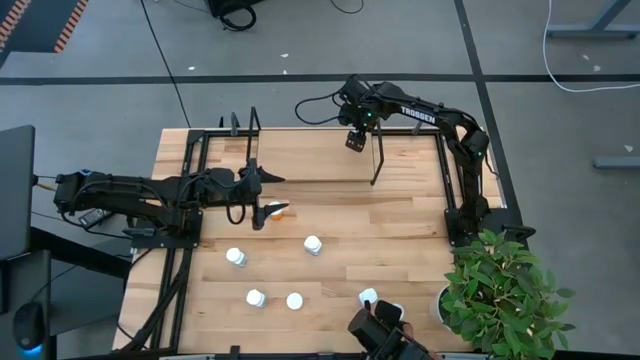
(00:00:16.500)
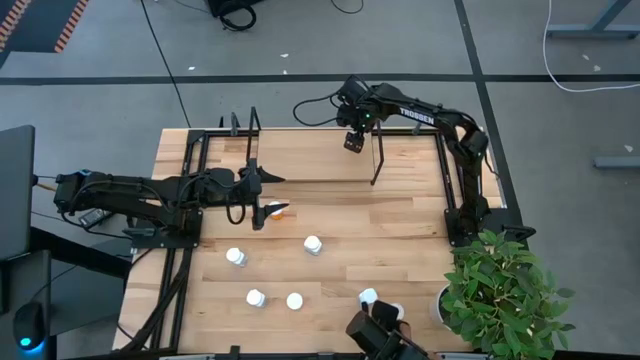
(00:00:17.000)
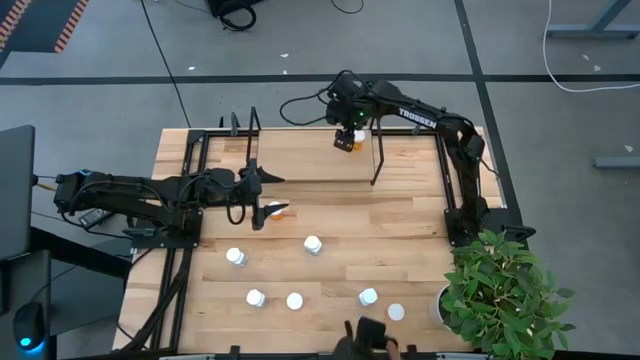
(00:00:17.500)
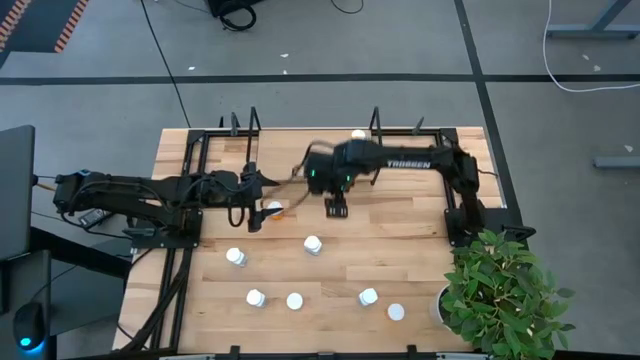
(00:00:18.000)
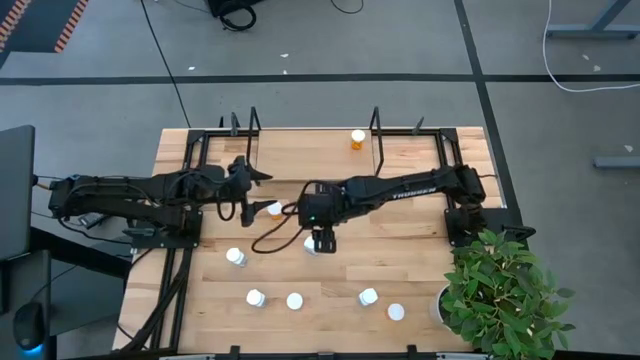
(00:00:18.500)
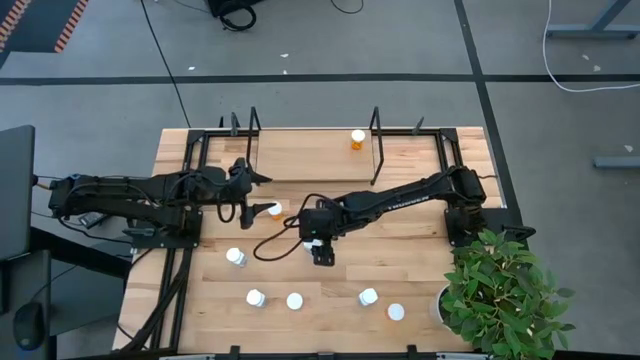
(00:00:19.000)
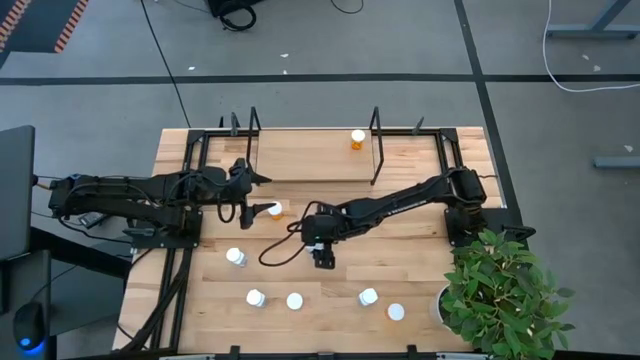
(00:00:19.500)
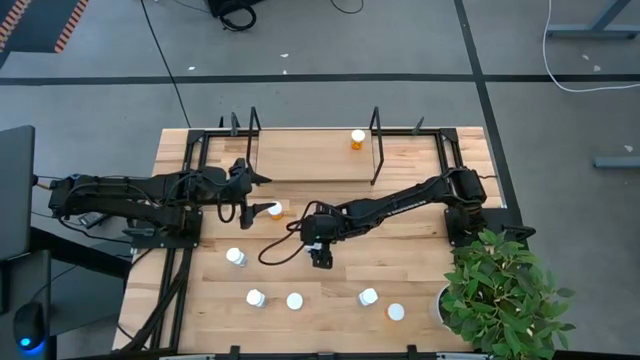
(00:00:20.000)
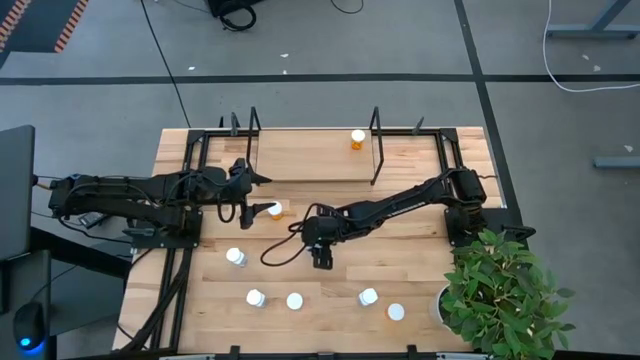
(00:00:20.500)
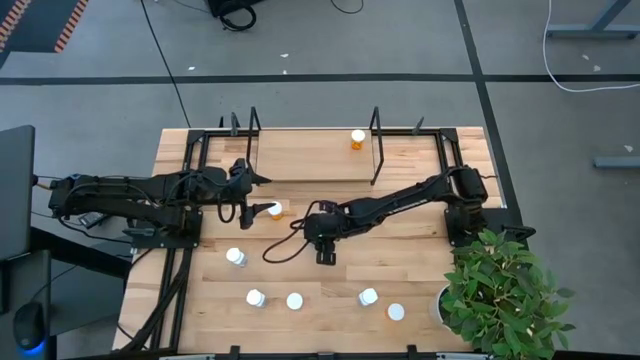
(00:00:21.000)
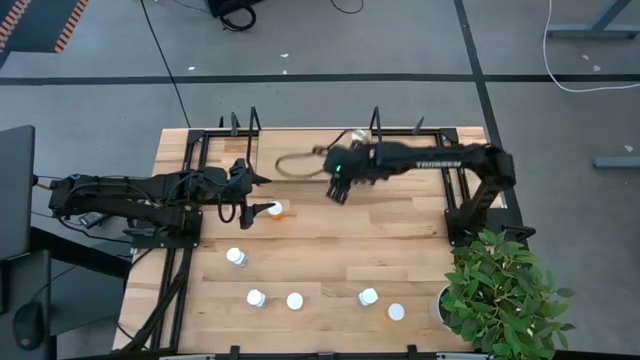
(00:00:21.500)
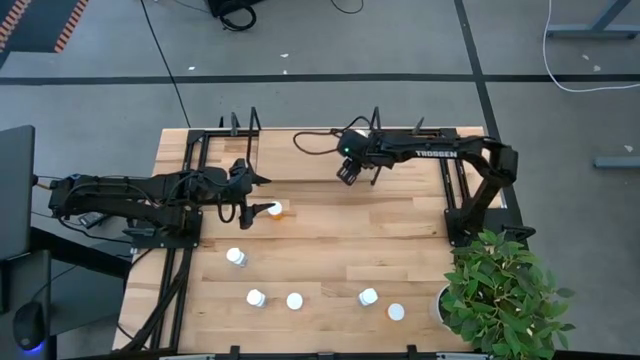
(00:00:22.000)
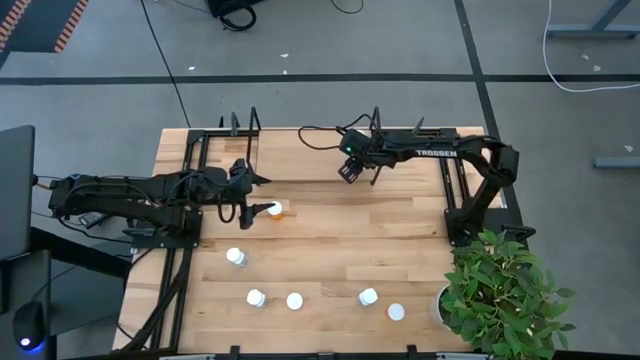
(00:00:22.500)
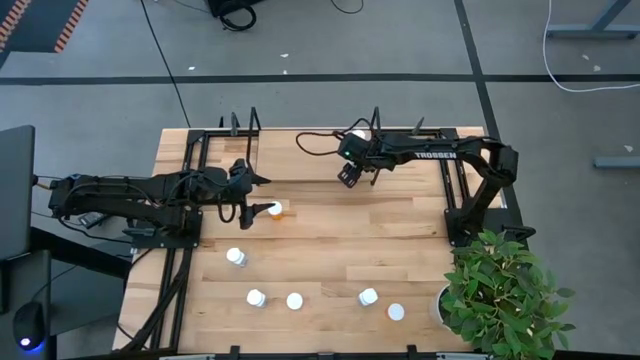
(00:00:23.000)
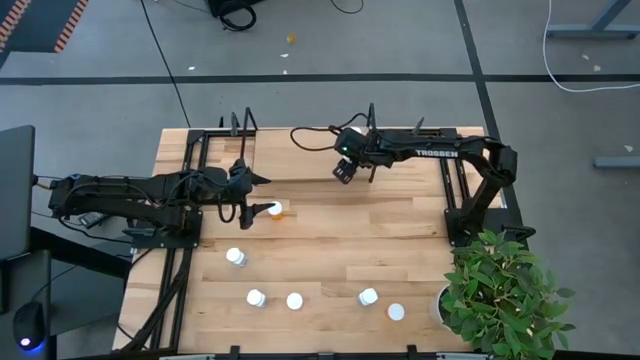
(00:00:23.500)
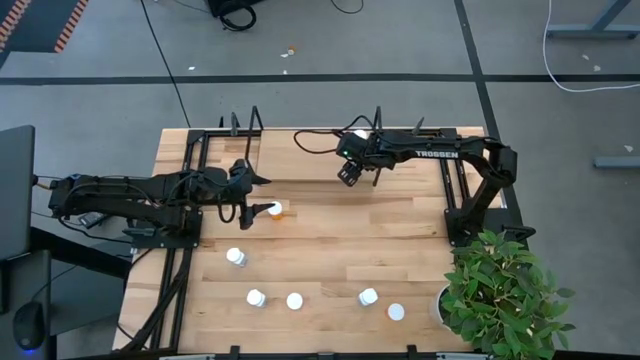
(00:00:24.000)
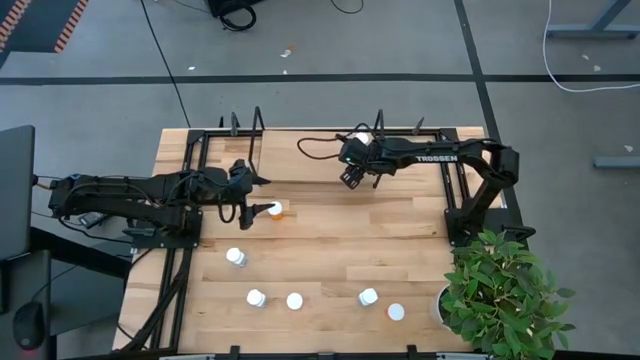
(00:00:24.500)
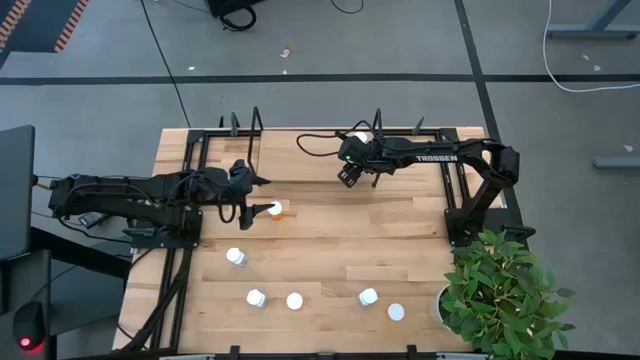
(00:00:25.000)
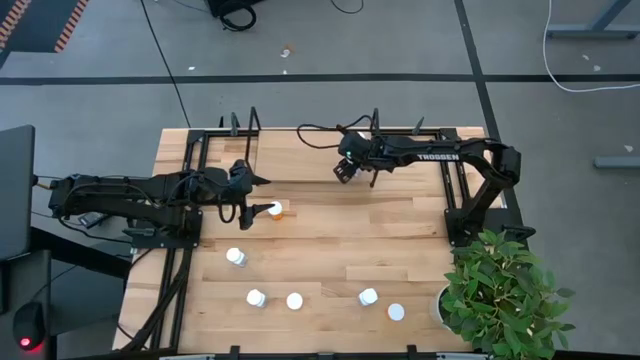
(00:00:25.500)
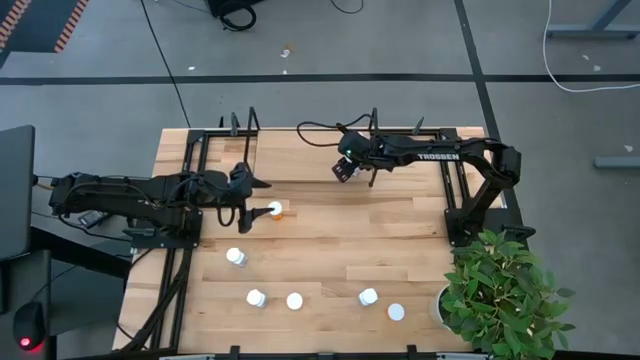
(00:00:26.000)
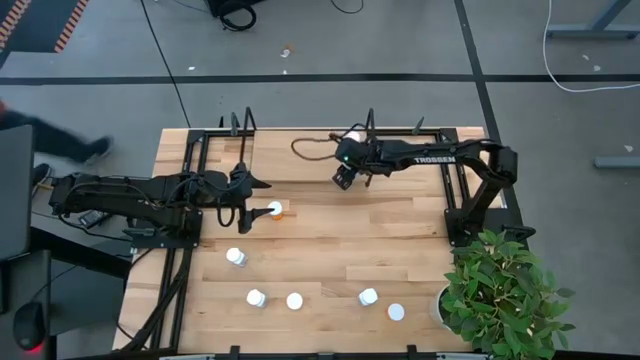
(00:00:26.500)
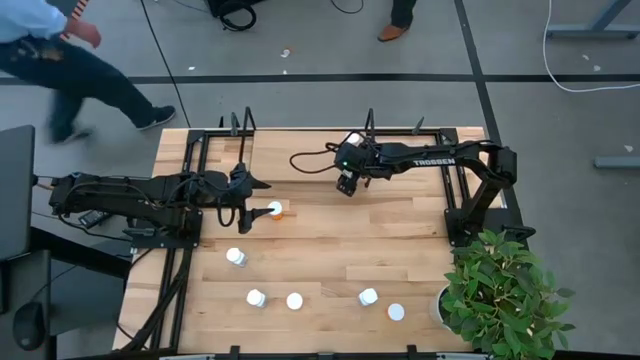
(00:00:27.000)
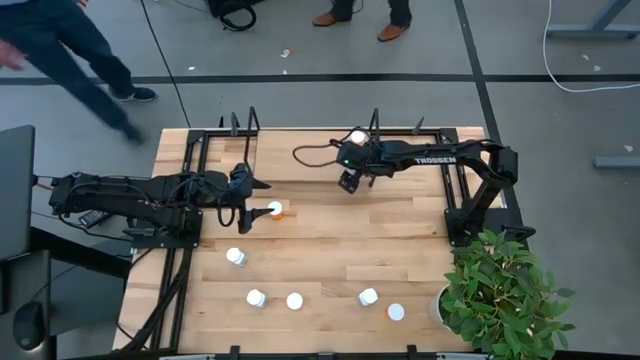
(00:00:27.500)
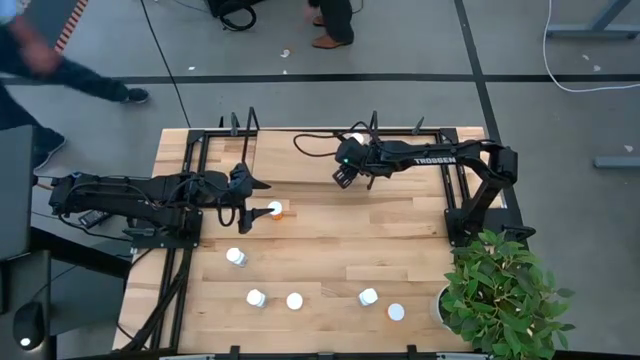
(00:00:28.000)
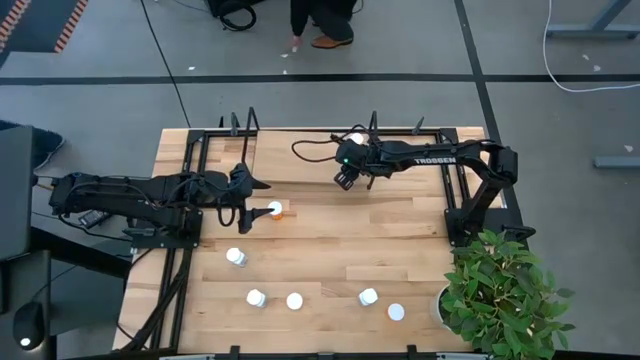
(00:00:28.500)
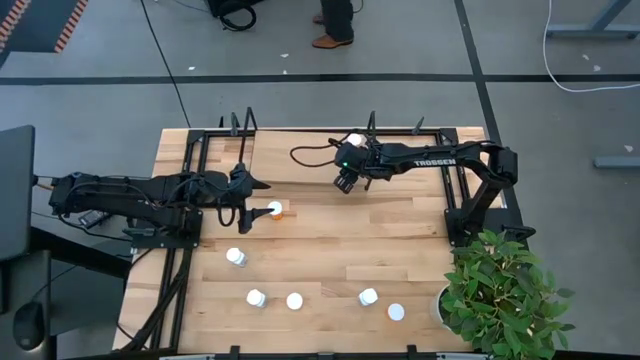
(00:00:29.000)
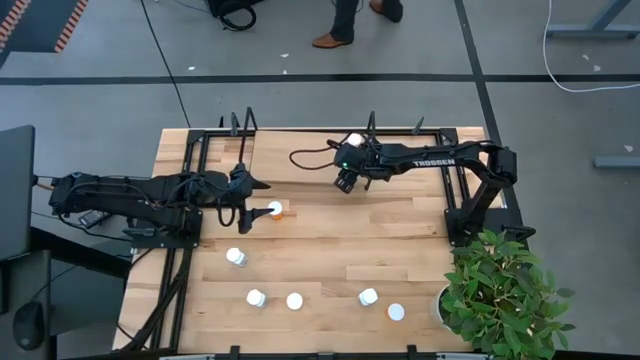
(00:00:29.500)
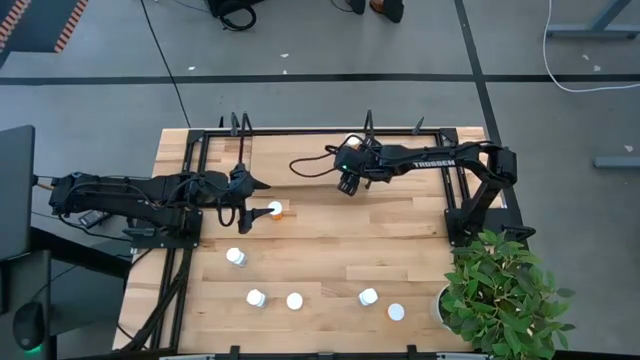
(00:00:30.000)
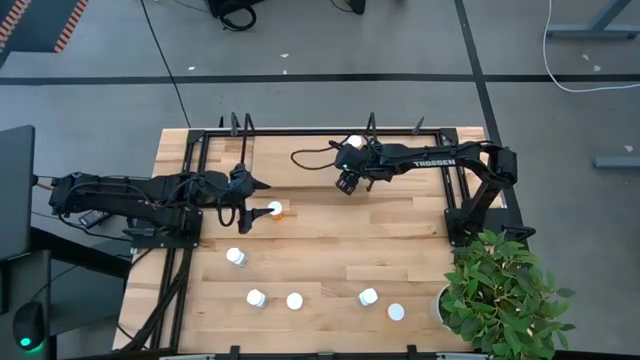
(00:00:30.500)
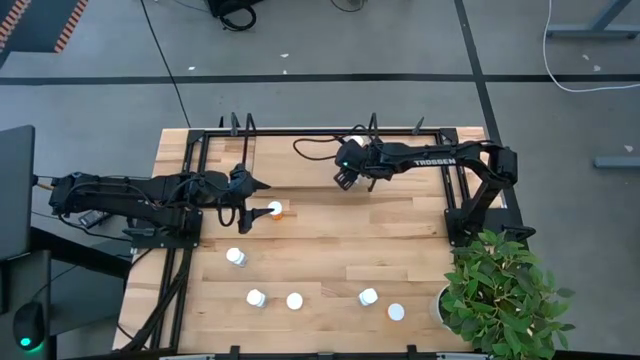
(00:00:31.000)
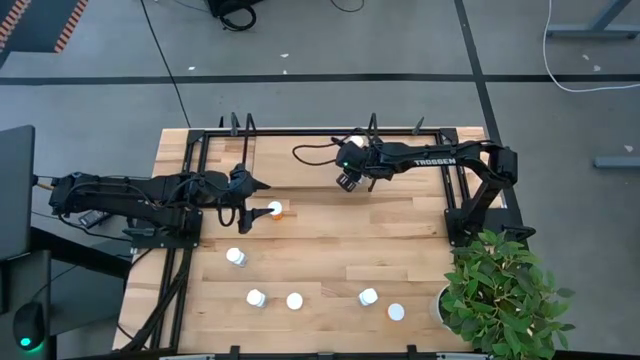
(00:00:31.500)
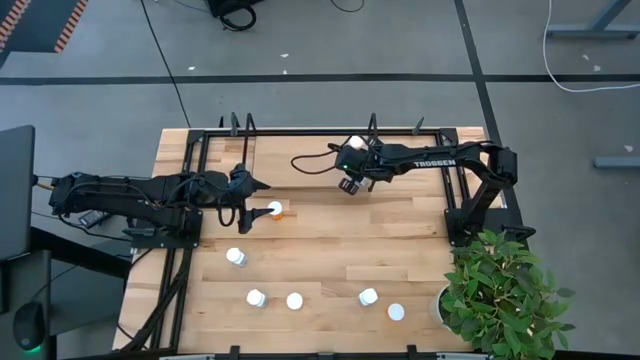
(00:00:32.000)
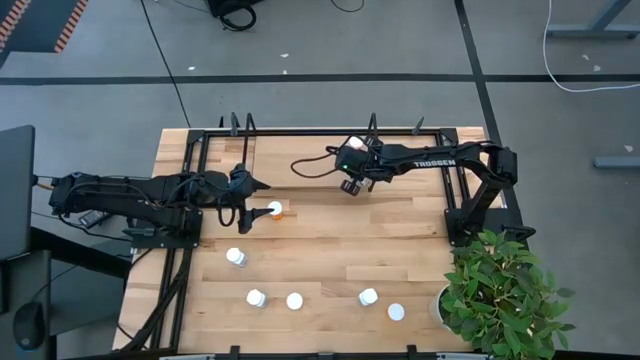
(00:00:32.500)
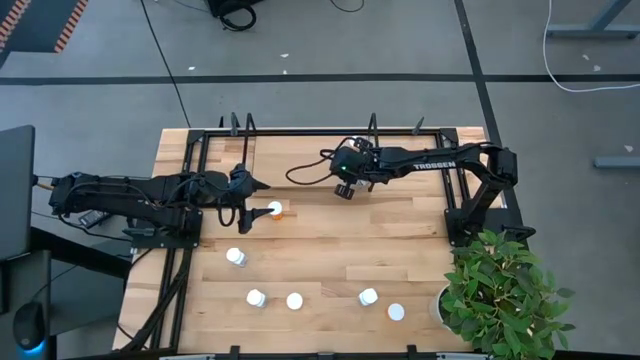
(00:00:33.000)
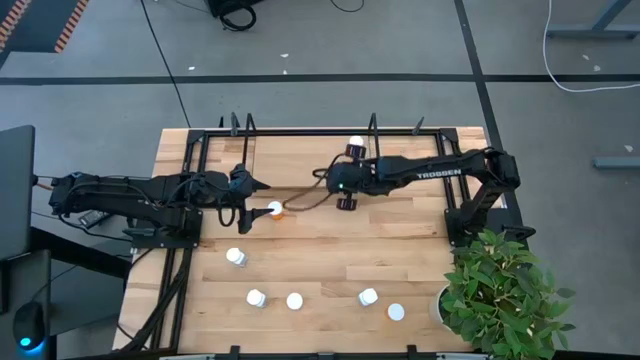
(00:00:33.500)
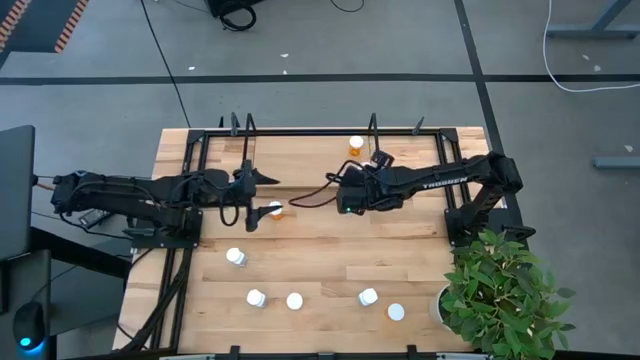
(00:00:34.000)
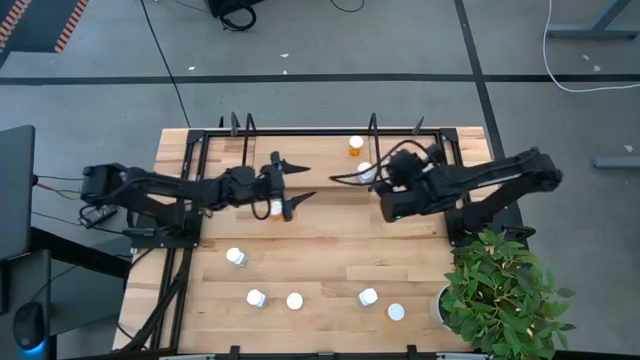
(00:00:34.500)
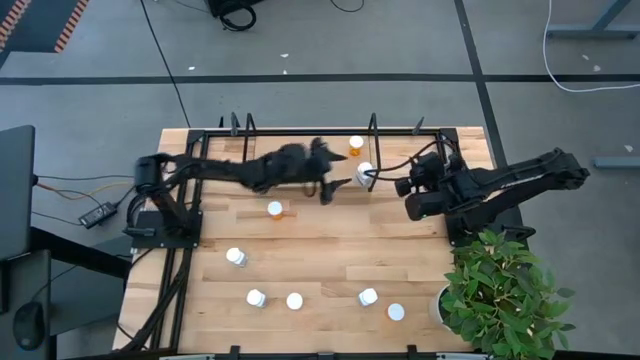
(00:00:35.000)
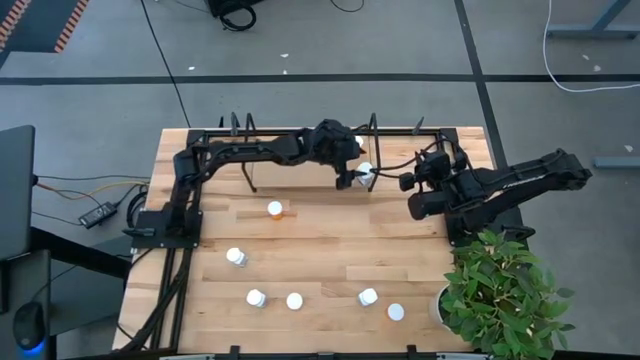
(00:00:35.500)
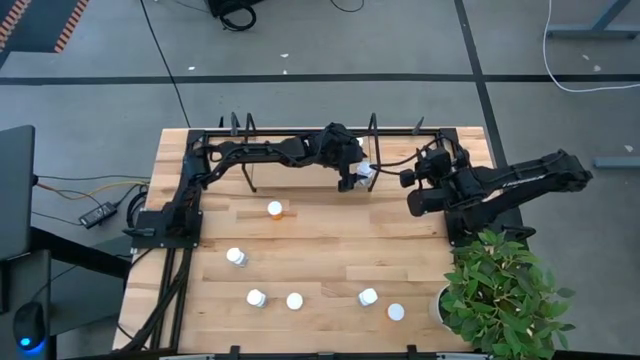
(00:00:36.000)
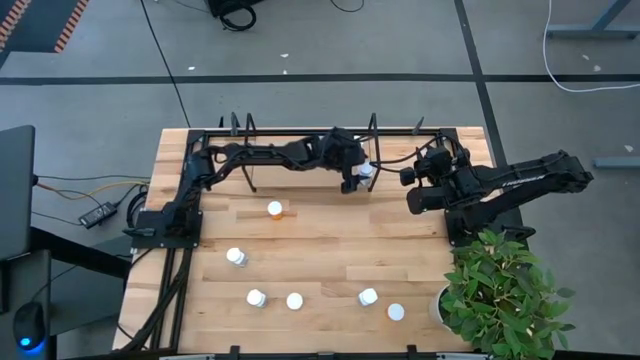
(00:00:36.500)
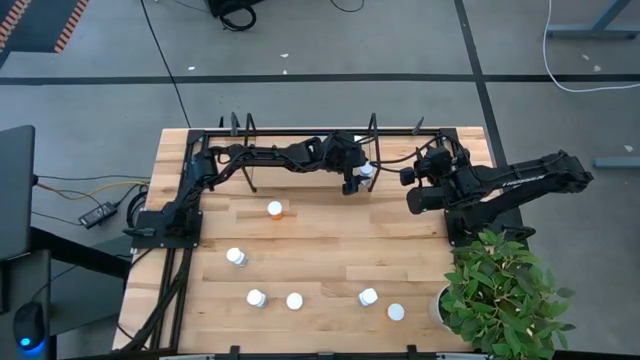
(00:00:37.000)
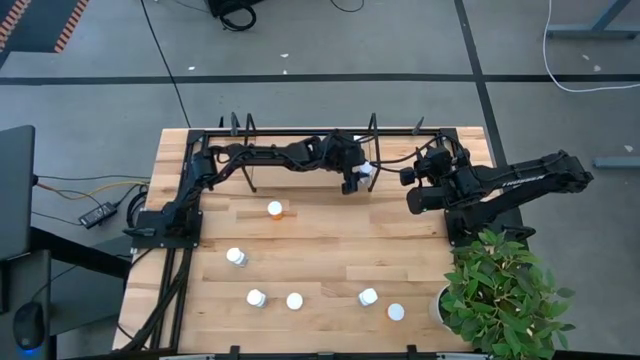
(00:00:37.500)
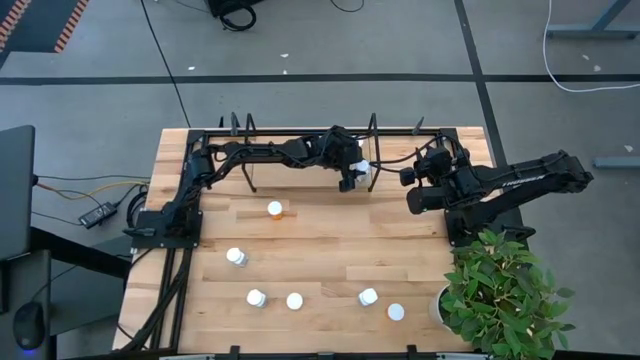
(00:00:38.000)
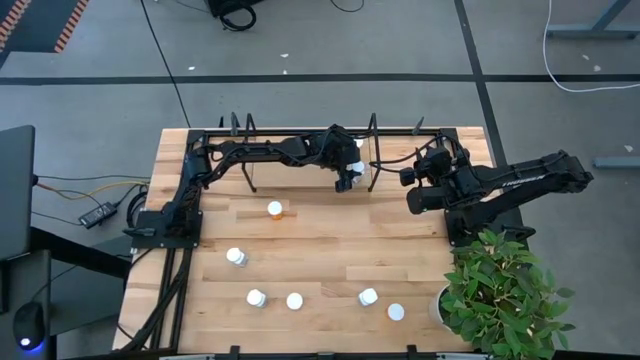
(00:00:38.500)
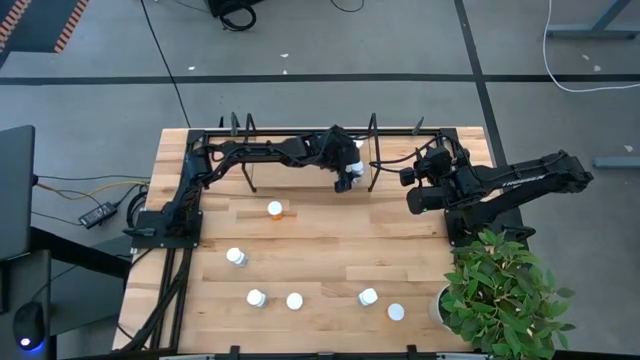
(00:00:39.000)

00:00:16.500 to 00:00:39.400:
Task: Pick and place medicine bottles onto shelf by color
Put the white pill bottle on the shelf
